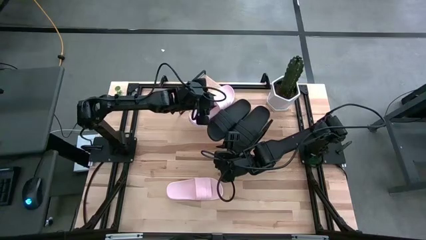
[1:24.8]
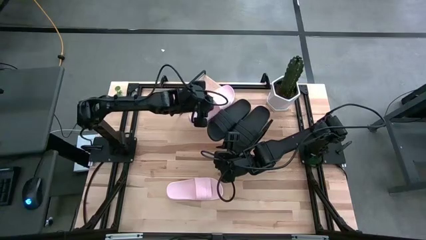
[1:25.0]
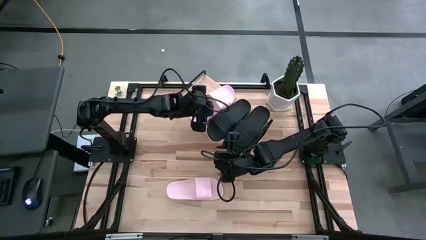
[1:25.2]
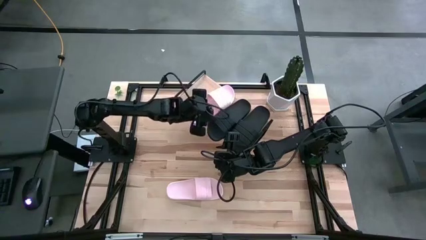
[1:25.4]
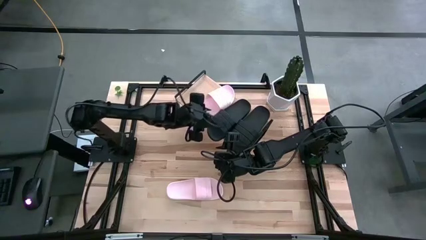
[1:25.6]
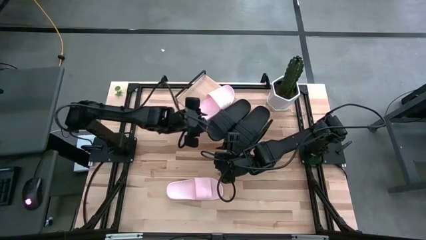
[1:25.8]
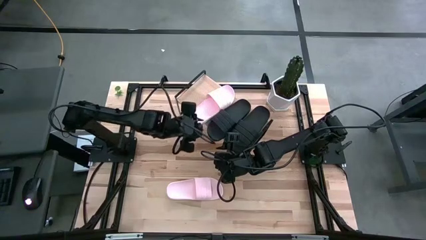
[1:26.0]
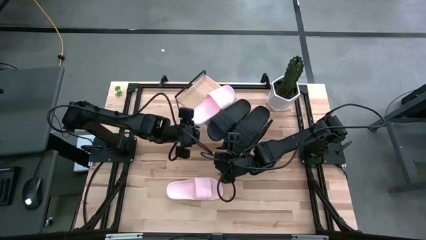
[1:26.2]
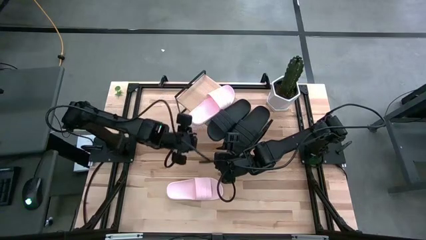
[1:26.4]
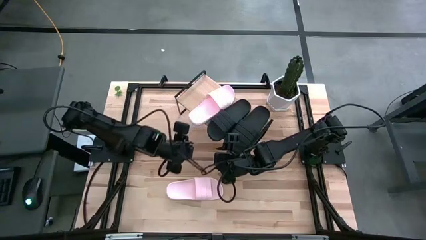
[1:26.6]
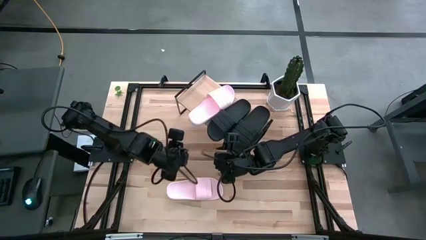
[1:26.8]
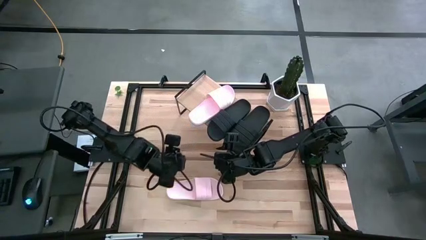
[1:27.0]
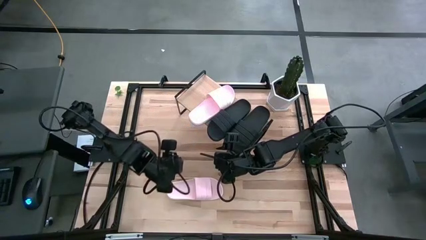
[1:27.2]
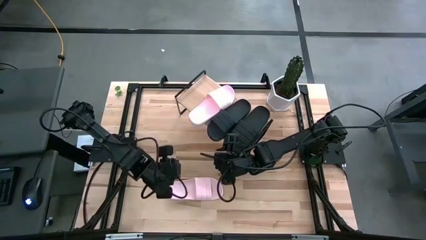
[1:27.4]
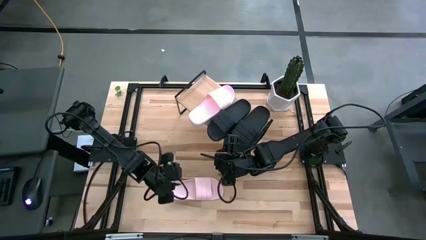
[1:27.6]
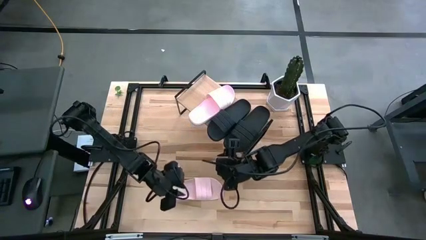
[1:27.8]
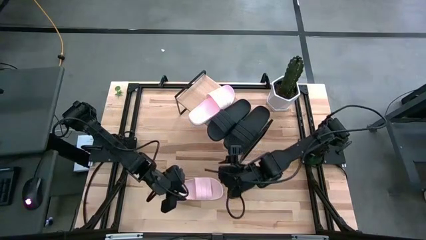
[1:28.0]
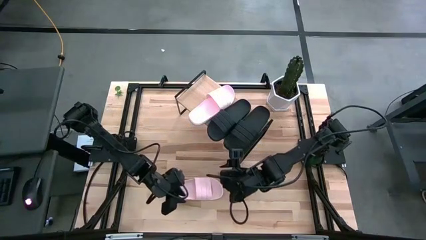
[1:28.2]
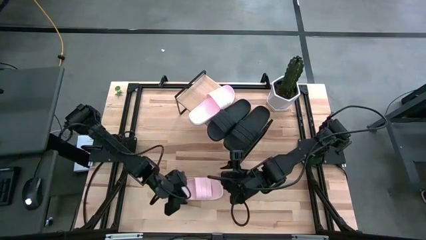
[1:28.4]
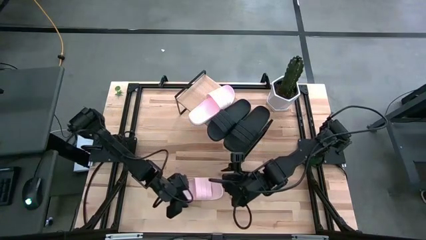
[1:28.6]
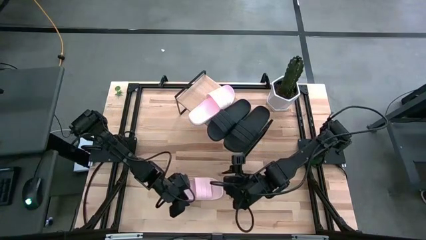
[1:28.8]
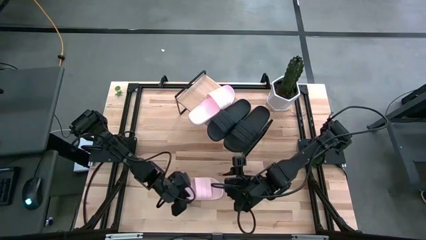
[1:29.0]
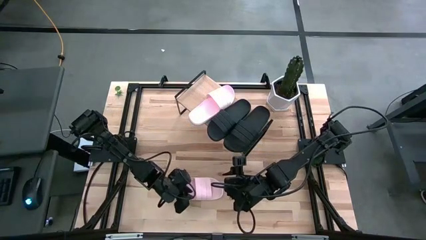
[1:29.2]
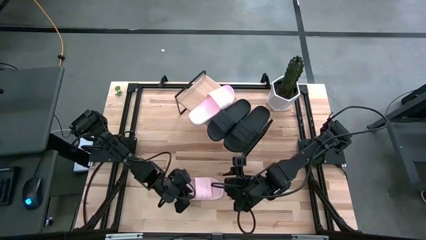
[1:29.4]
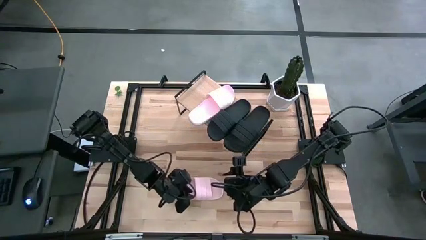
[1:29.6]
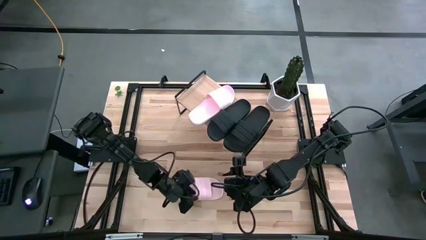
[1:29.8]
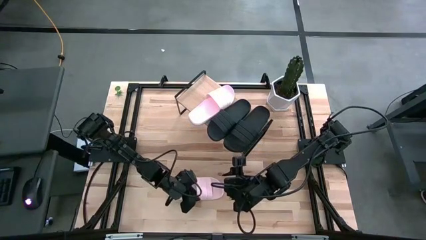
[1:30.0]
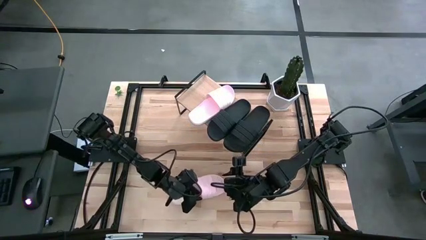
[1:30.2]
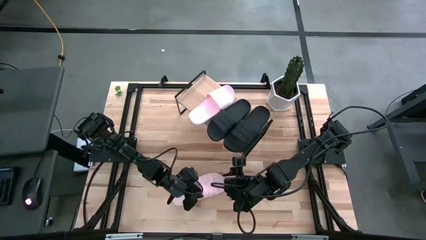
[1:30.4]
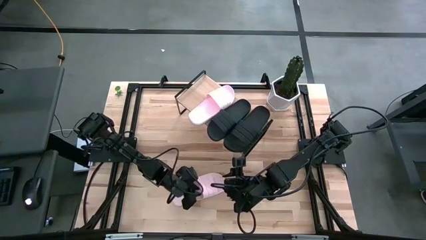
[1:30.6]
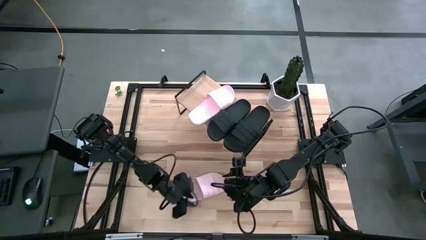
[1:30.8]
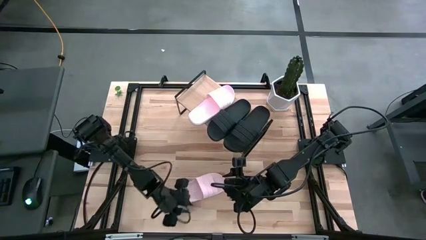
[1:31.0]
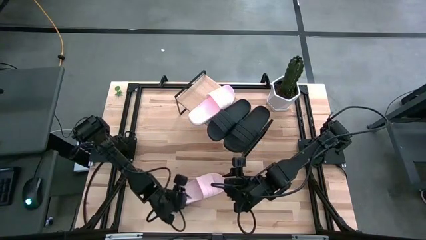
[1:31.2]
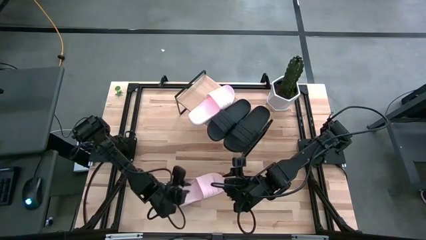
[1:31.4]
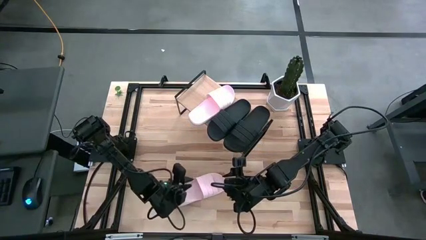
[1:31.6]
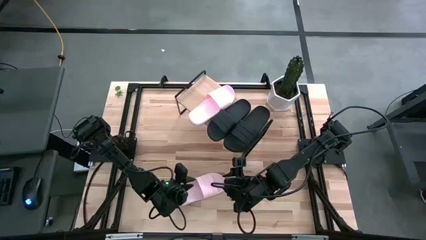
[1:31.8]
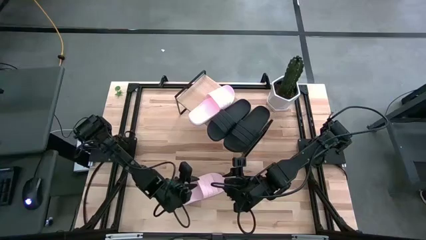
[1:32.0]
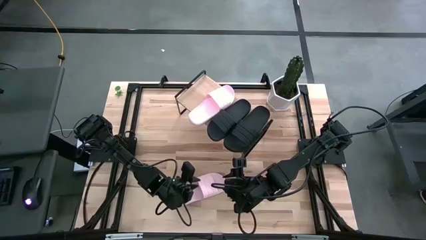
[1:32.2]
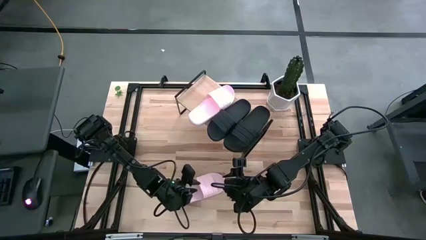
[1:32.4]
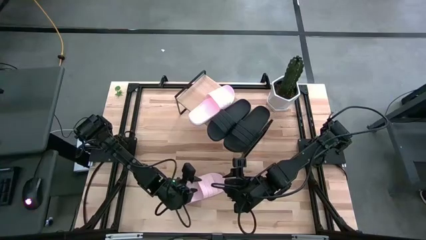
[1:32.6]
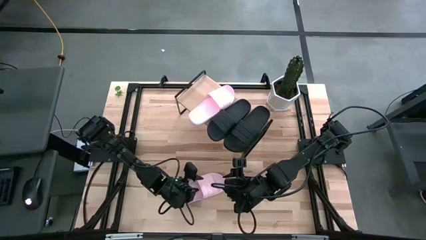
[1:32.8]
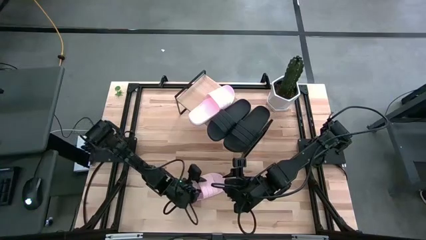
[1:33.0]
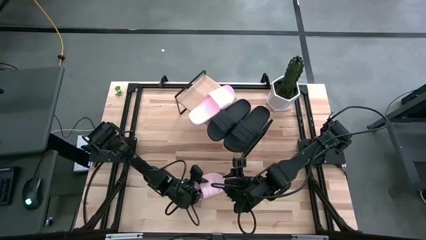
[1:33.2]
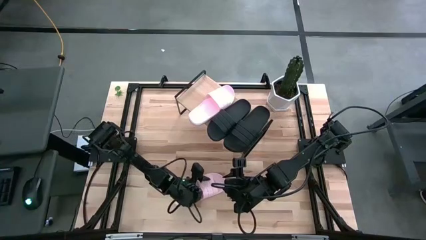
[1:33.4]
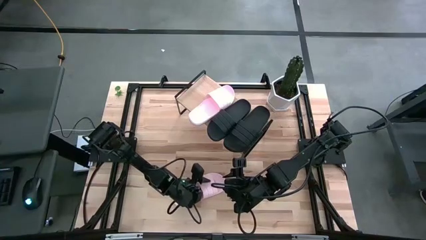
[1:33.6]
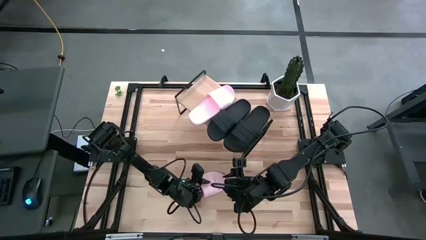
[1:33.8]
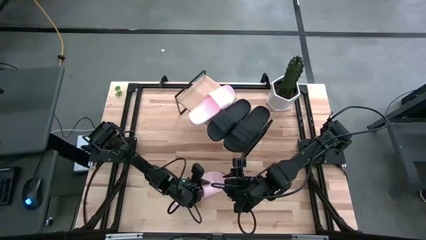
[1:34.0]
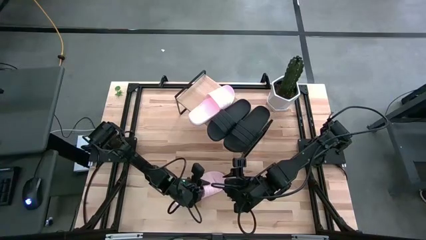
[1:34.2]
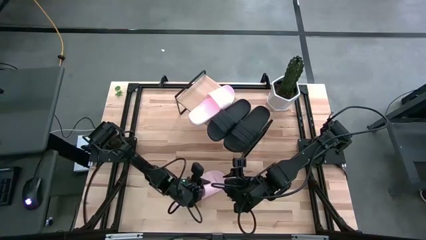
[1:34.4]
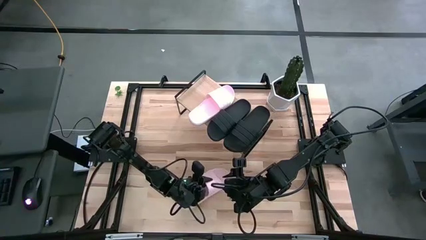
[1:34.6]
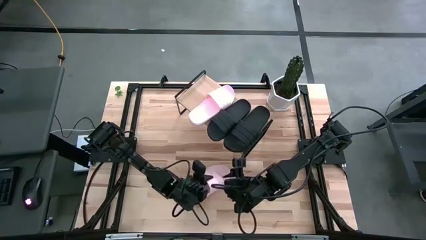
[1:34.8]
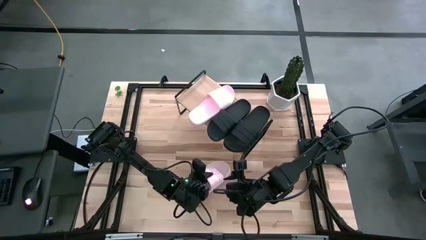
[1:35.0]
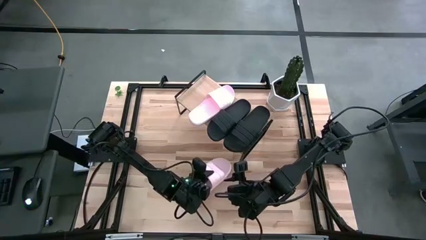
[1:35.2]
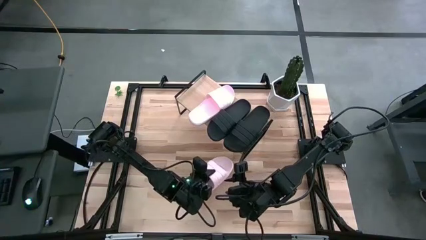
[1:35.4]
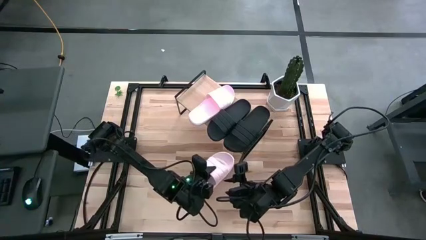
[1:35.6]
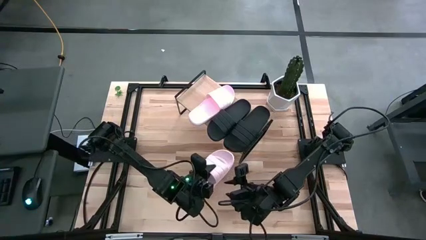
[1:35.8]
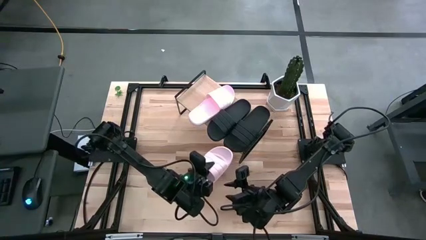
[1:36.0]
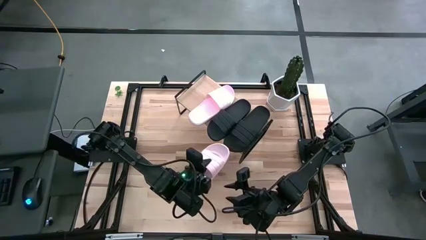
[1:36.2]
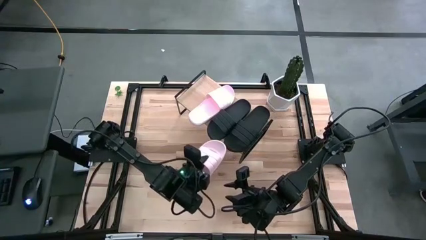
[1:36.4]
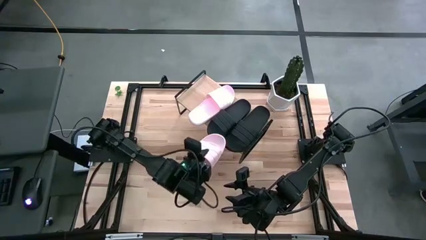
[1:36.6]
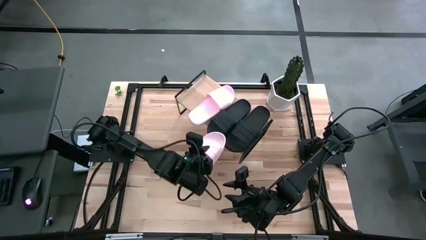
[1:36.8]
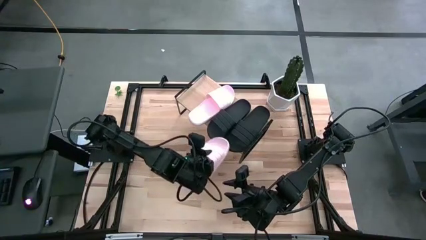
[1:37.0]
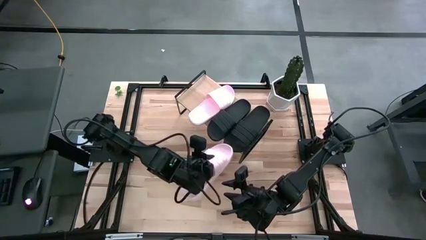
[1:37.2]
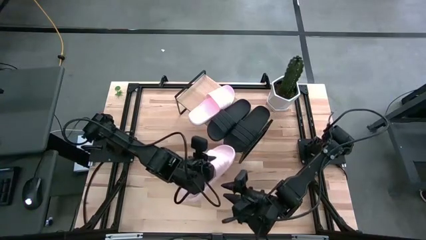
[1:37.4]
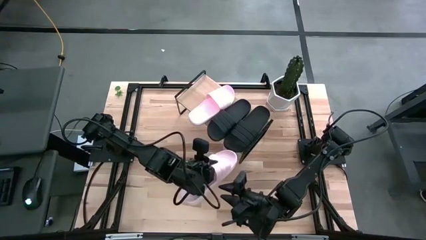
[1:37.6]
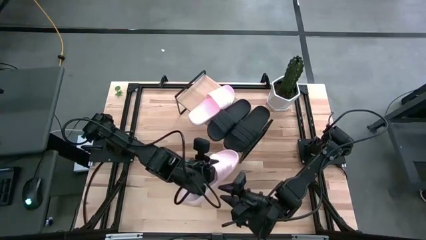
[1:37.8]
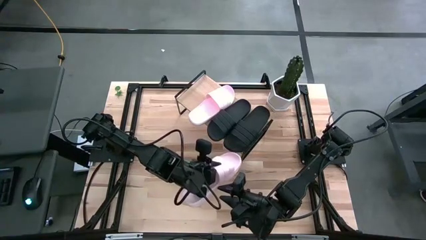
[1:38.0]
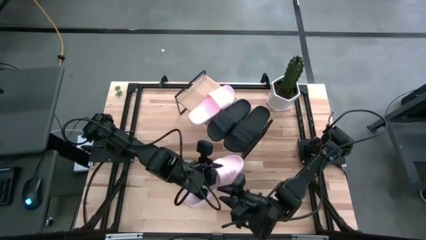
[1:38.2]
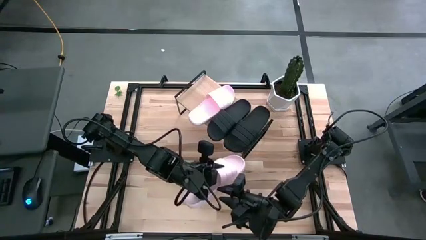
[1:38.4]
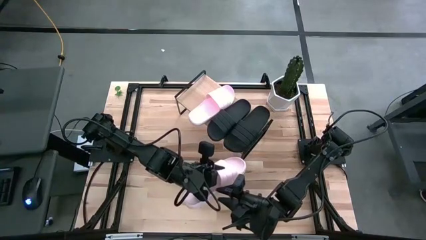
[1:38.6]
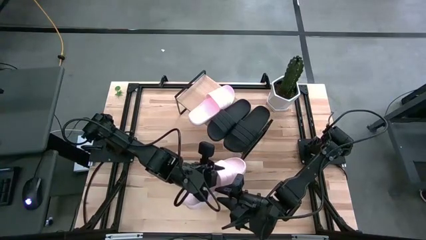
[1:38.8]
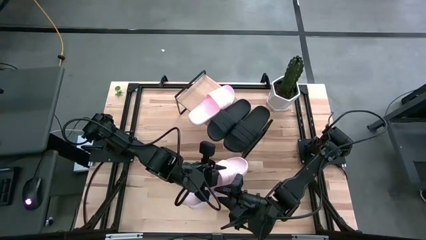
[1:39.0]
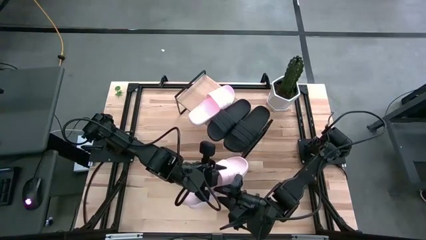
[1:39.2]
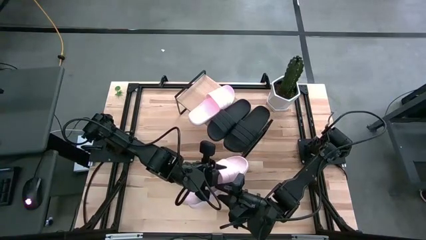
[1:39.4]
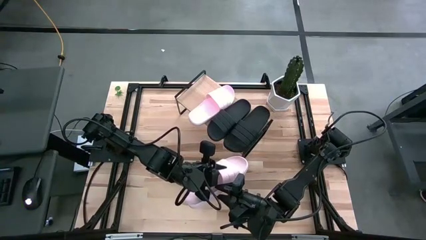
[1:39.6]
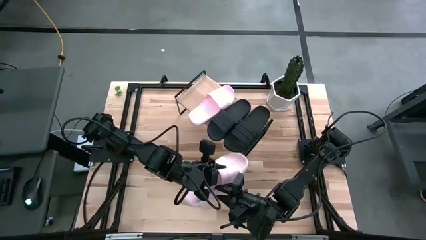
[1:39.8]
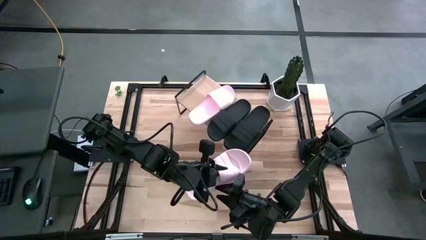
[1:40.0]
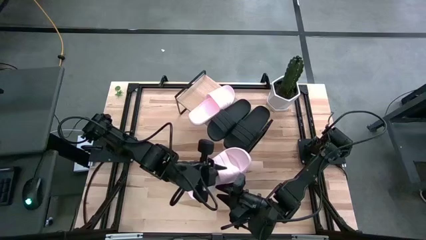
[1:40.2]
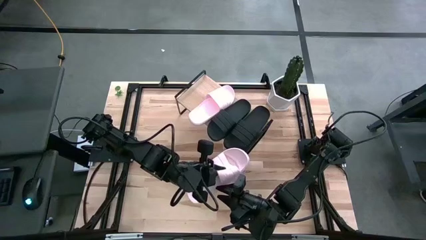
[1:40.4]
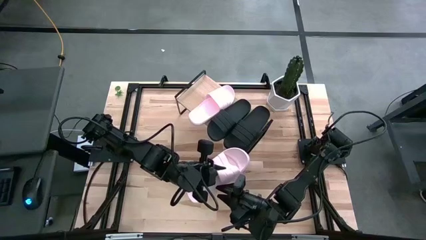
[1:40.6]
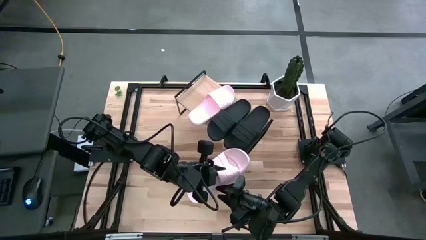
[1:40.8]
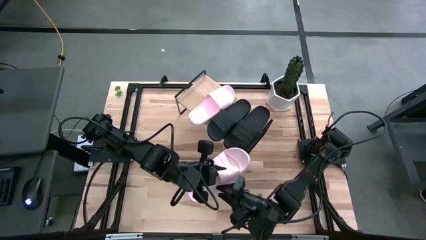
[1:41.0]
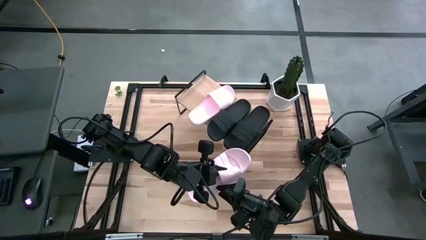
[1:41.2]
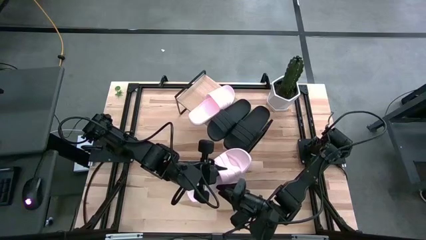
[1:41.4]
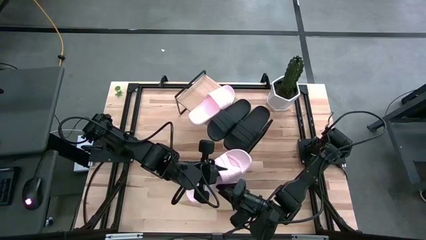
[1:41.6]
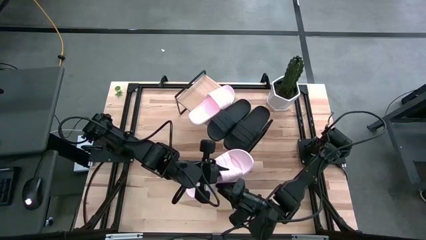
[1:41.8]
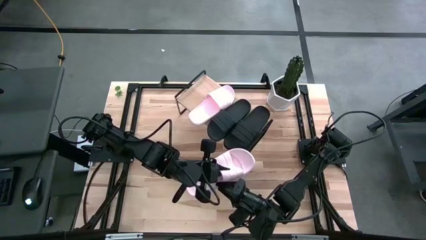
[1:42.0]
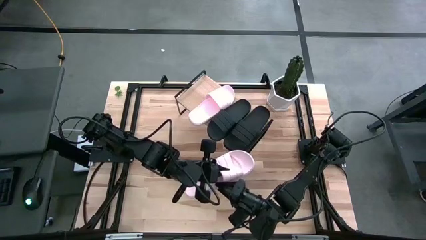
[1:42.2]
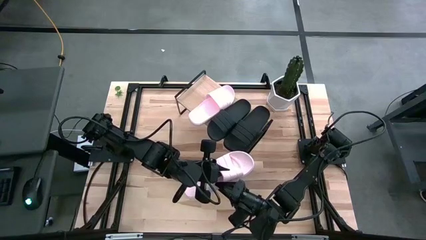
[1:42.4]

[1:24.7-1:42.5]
Task: Pick and place slides into the shelf
Put the pink slipper on the shelf
